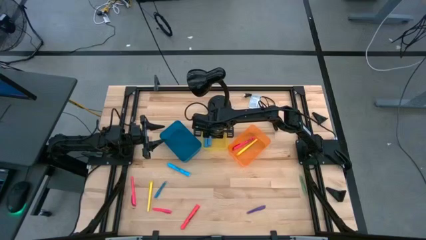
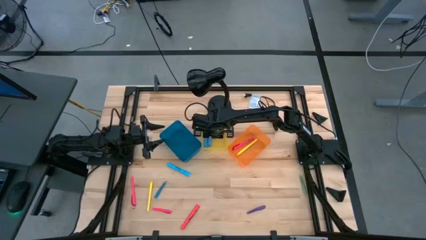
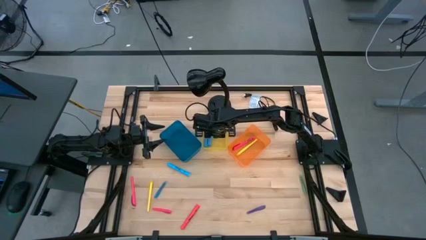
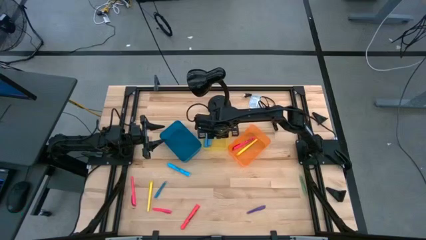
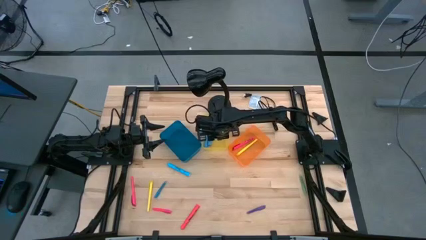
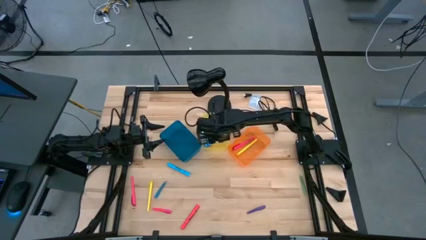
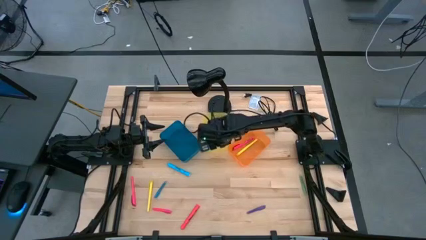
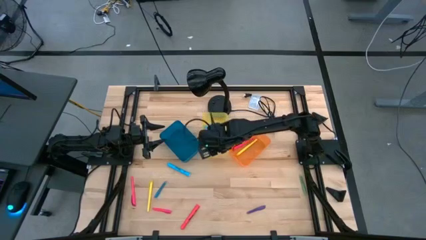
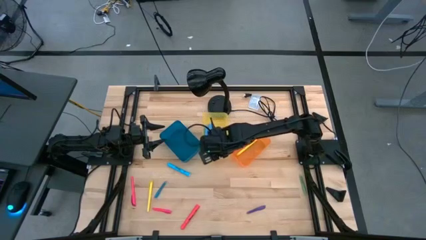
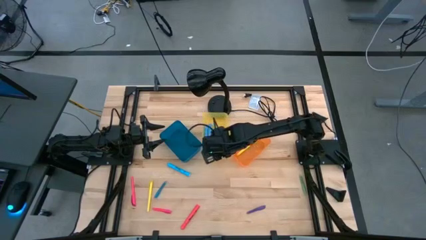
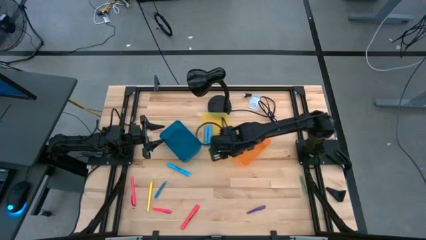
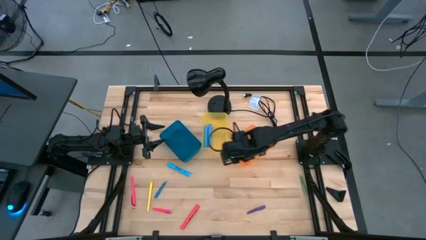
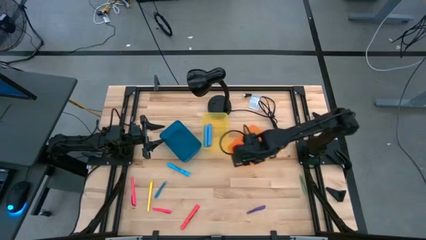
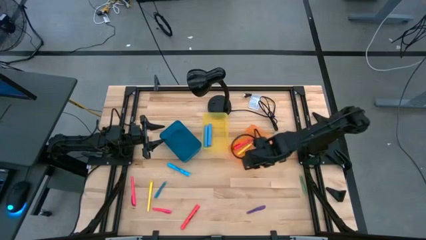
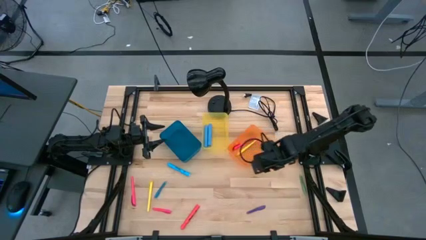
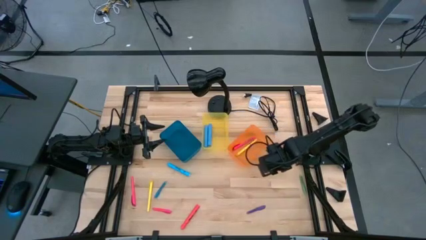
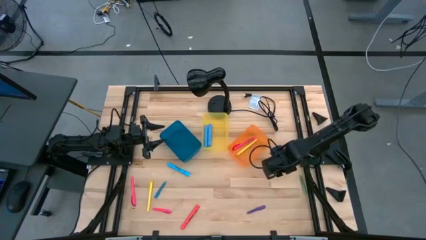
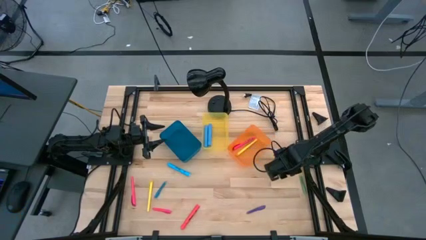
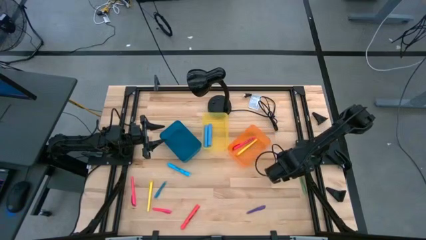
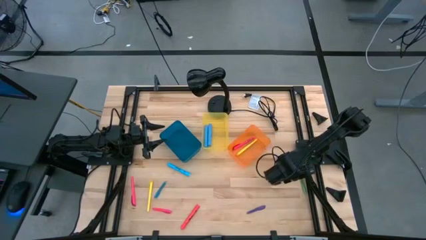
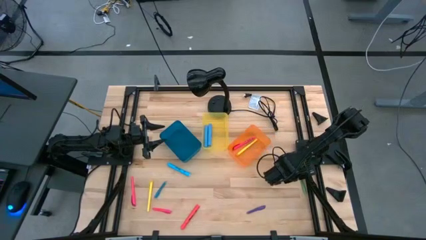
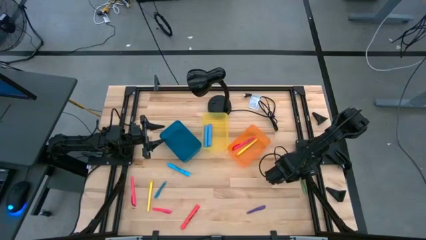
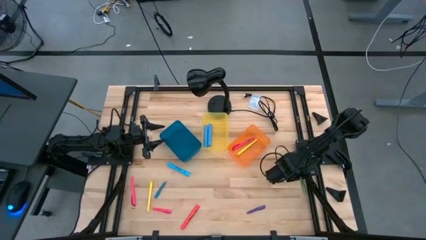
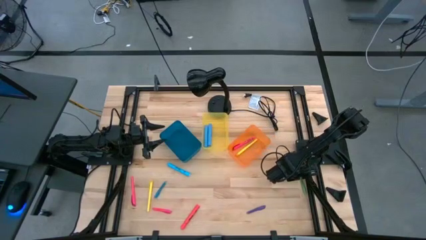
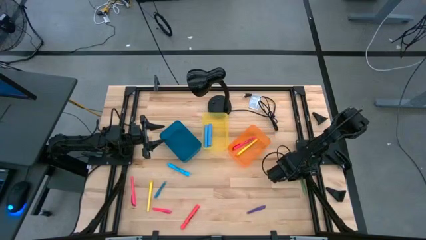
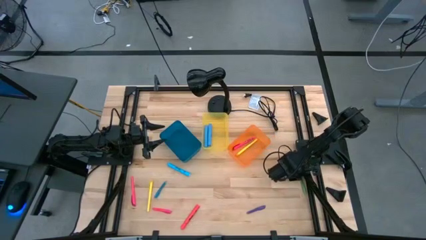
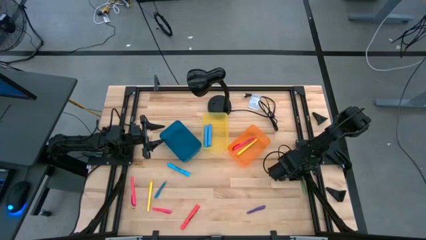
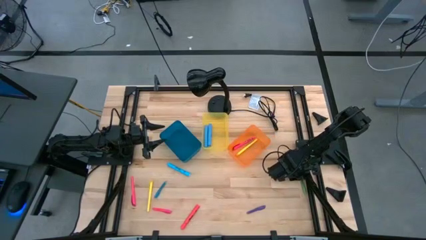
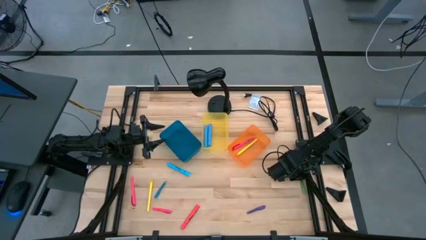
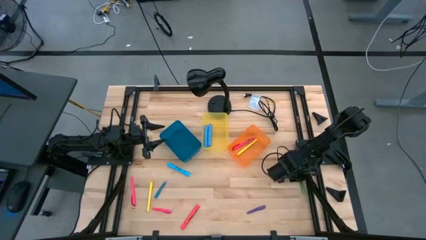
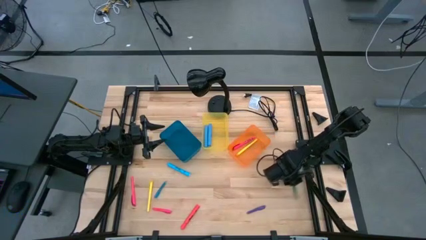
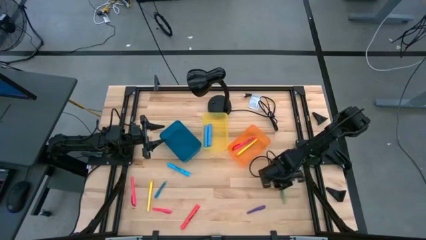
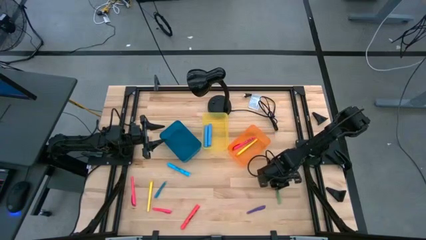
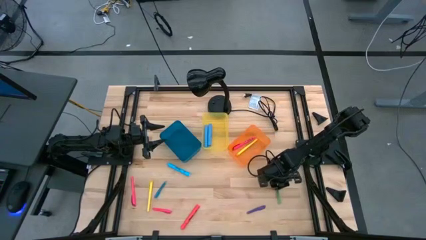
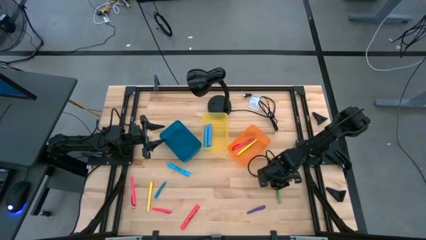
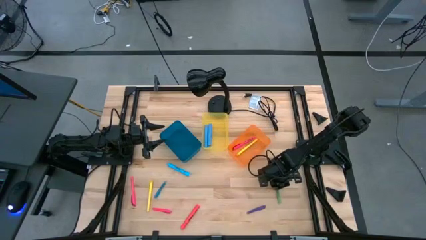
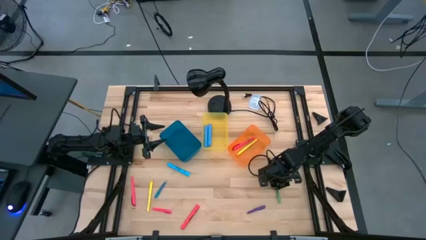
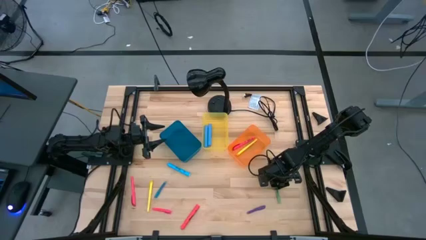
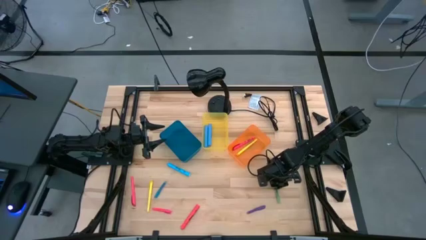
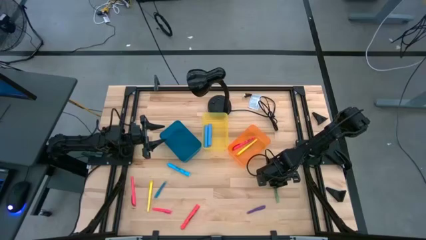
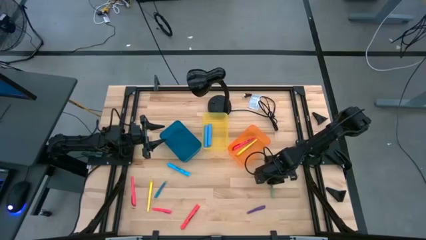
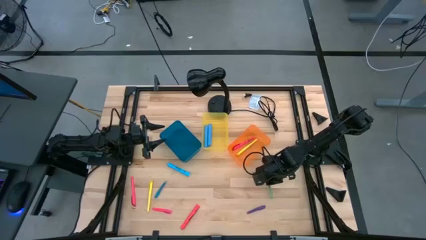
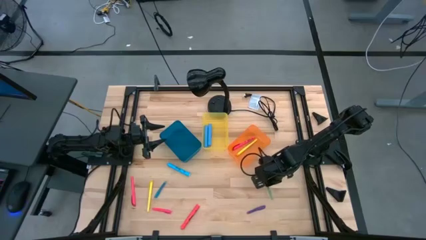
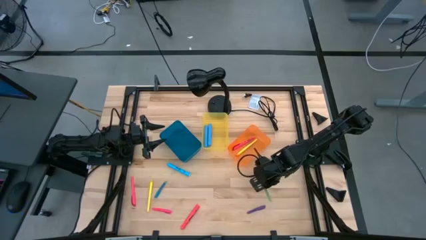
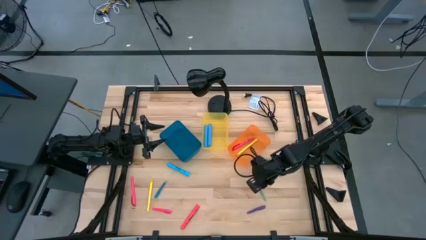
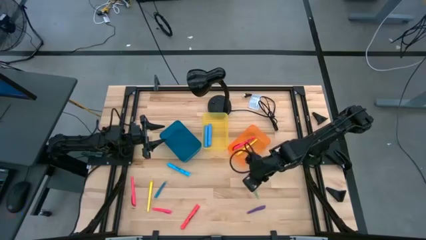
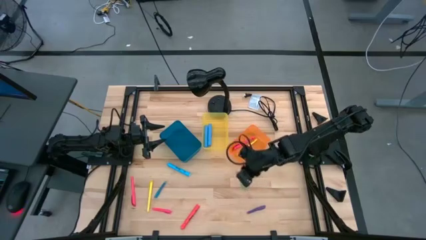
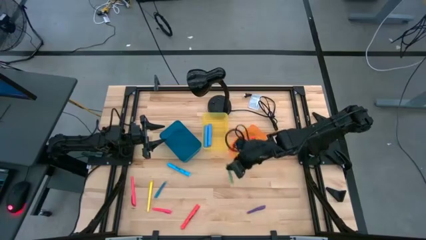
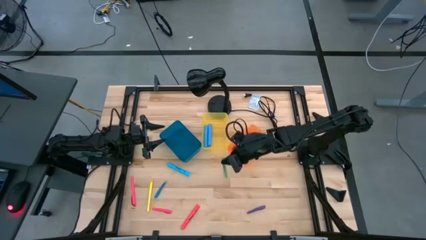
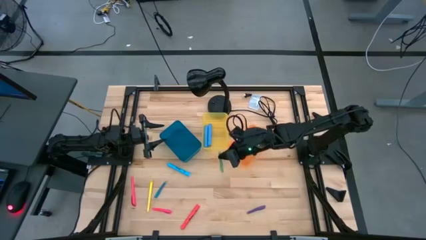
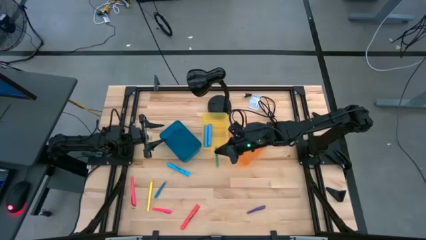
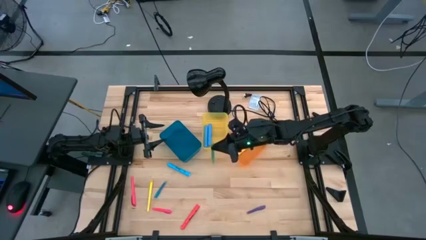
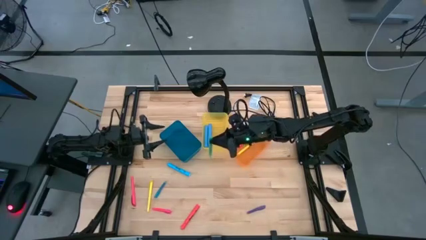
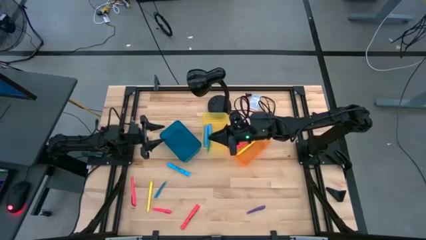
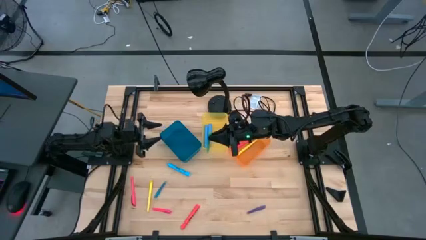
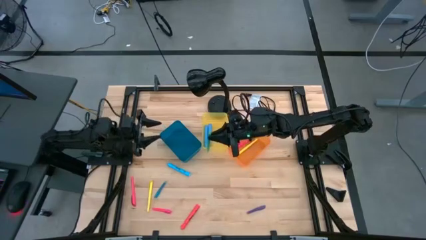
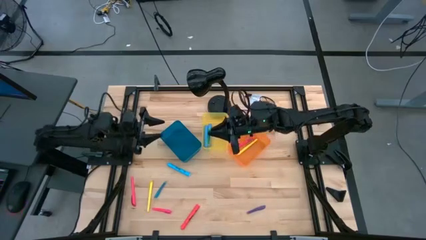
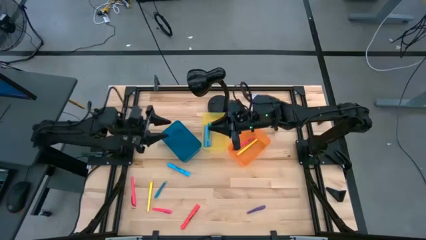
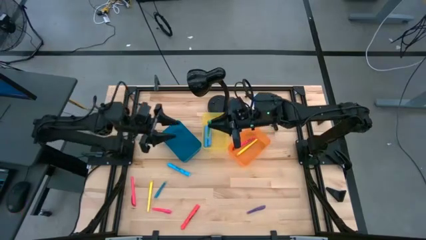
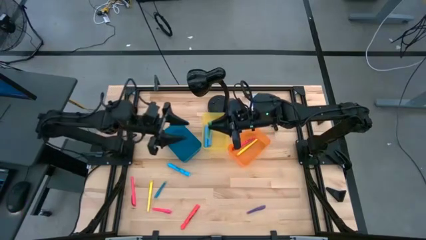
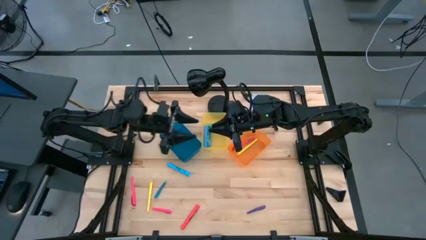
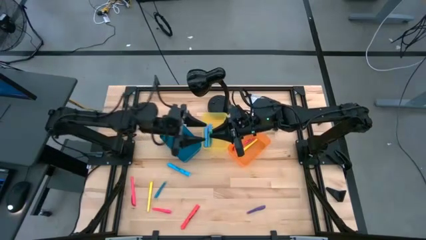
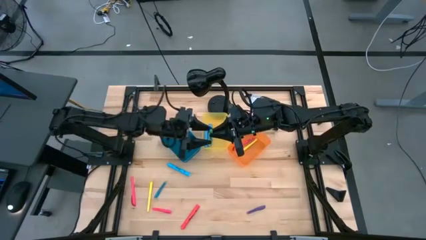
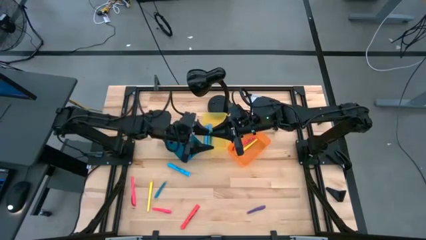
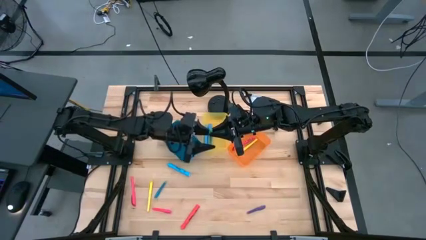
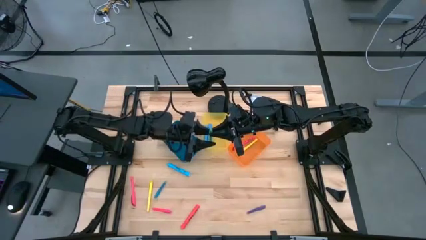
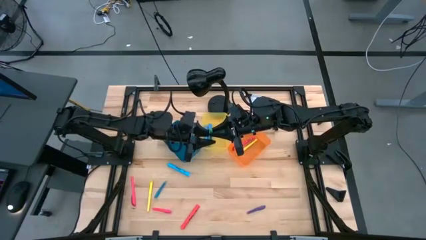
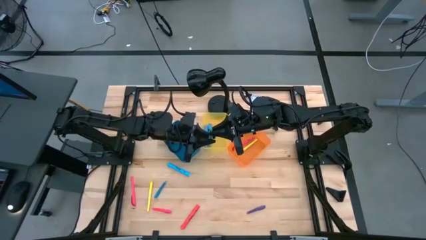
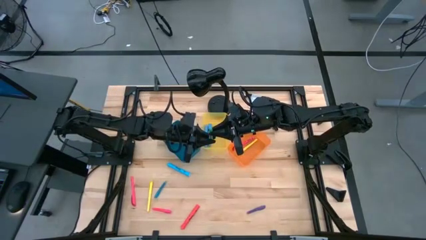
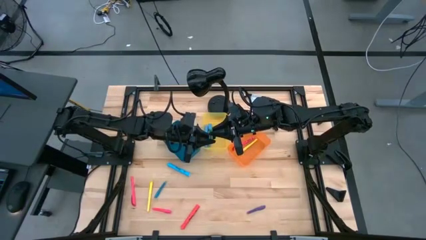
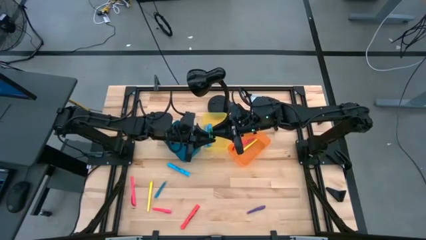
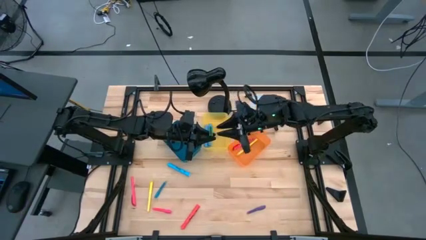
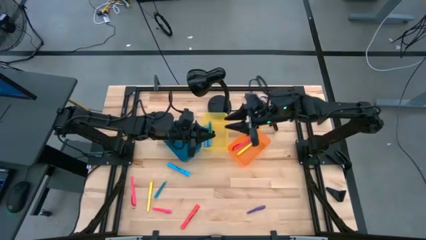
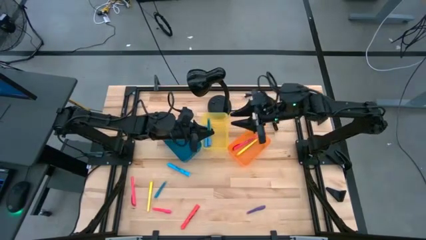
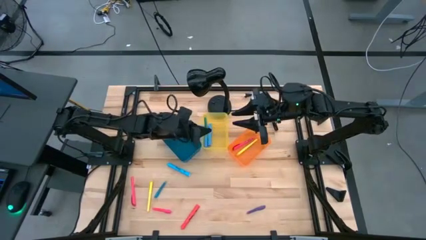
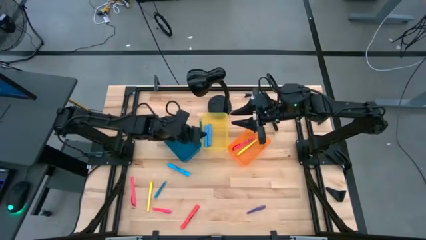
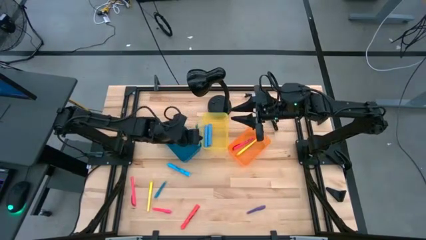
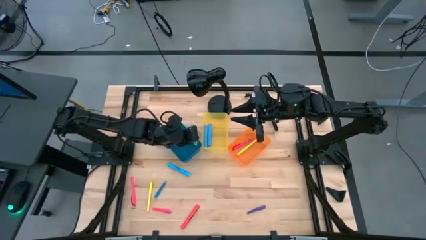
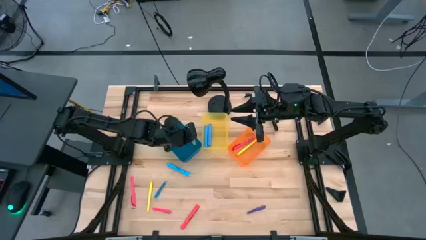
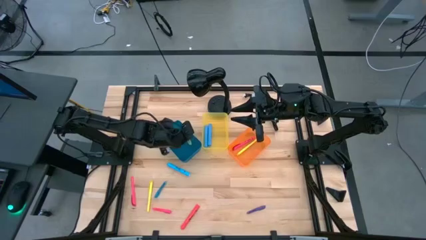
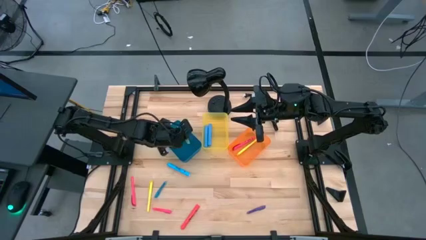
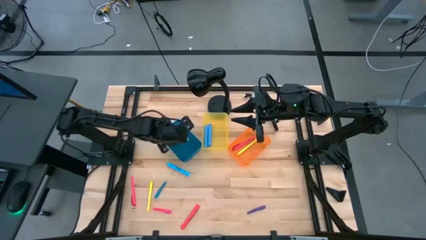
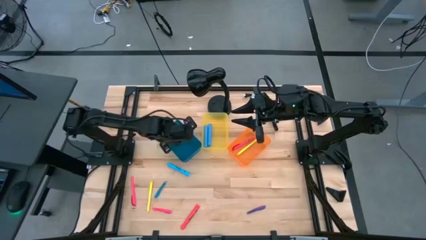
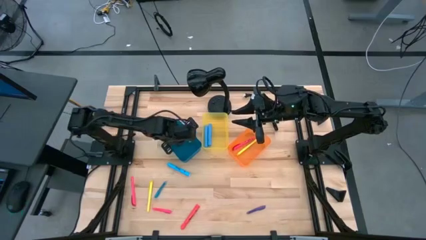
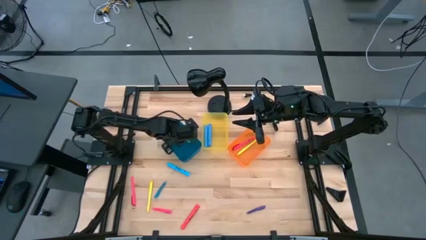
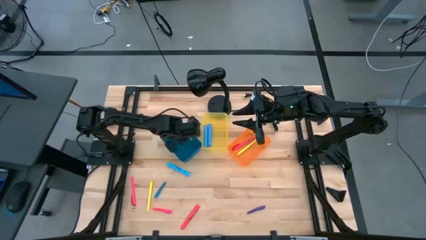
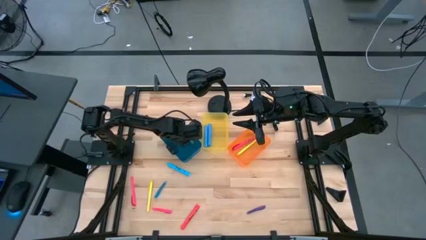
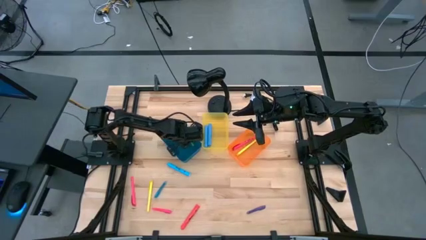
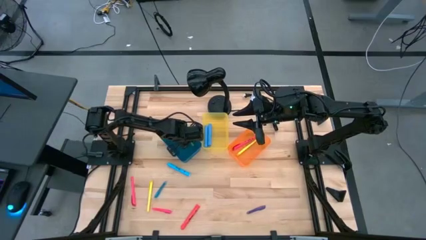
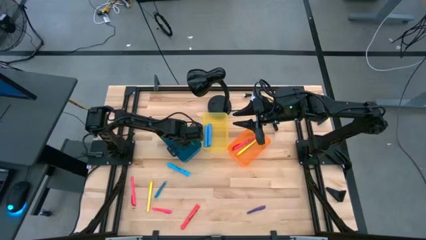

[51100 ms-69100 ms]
Task: Pick & Place Markers
Put the green transparent pen into the blue bin
